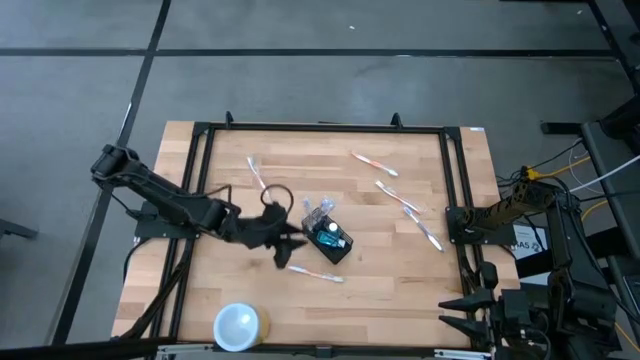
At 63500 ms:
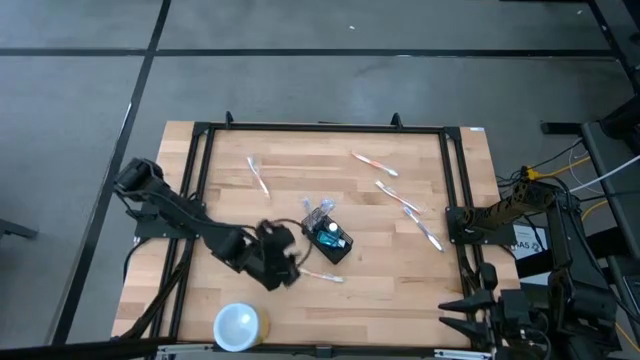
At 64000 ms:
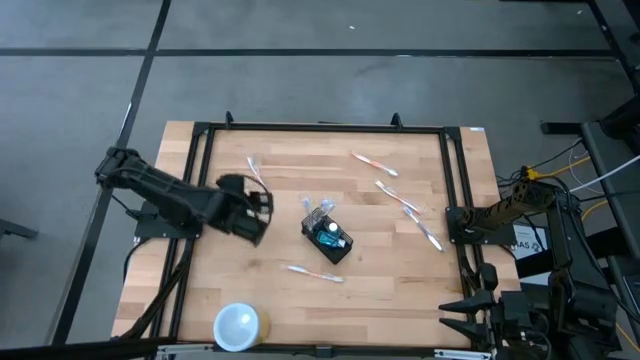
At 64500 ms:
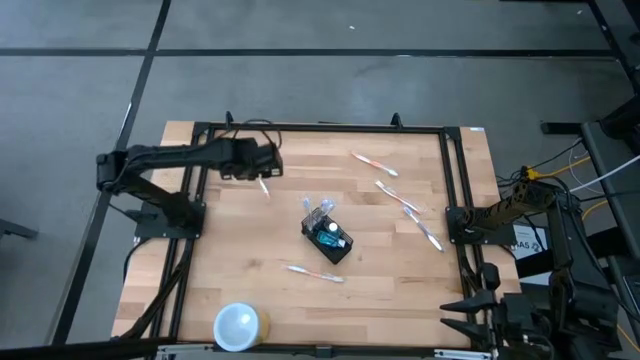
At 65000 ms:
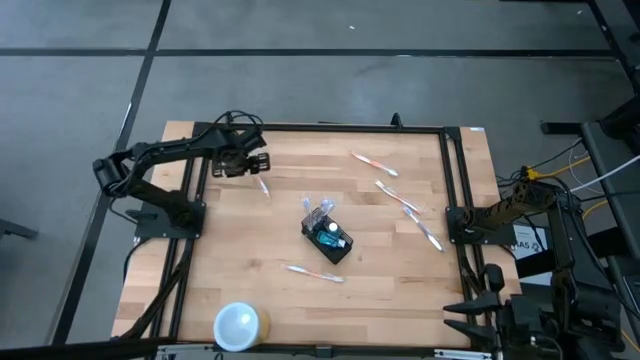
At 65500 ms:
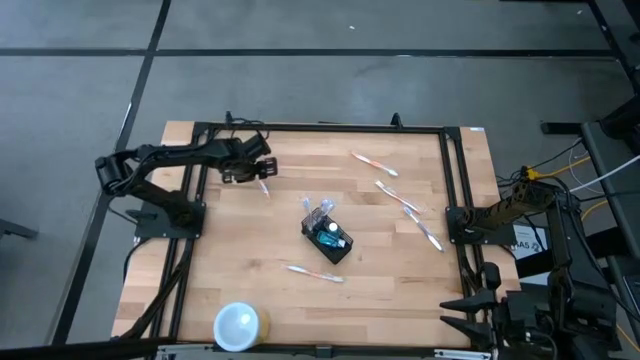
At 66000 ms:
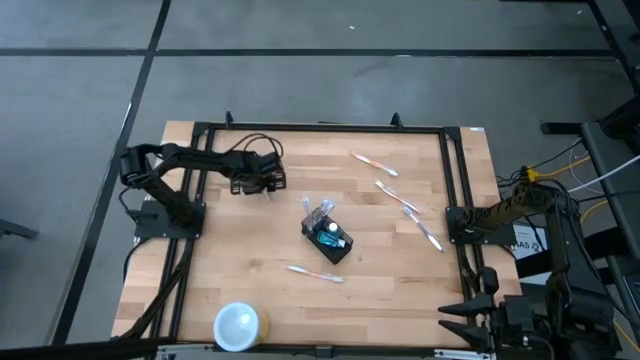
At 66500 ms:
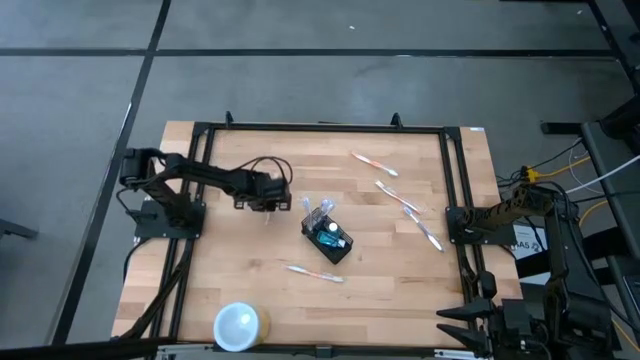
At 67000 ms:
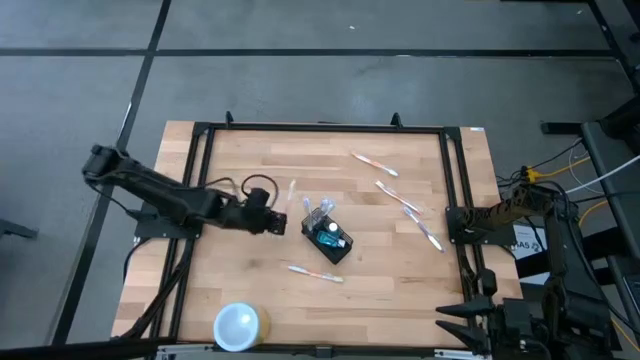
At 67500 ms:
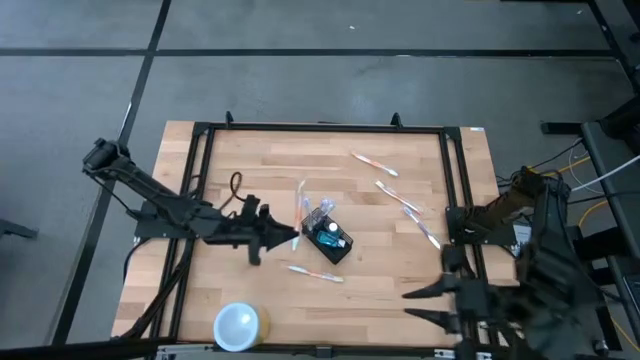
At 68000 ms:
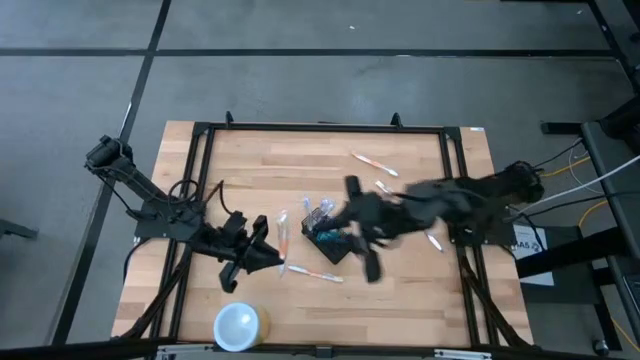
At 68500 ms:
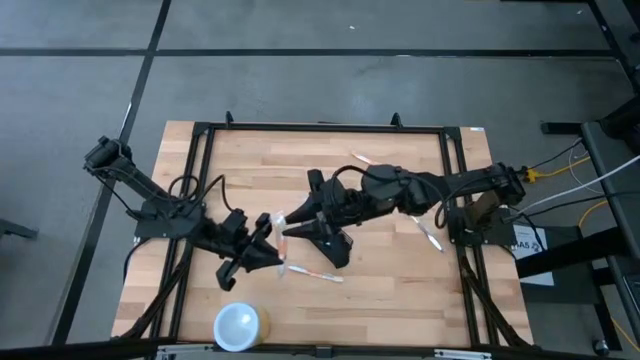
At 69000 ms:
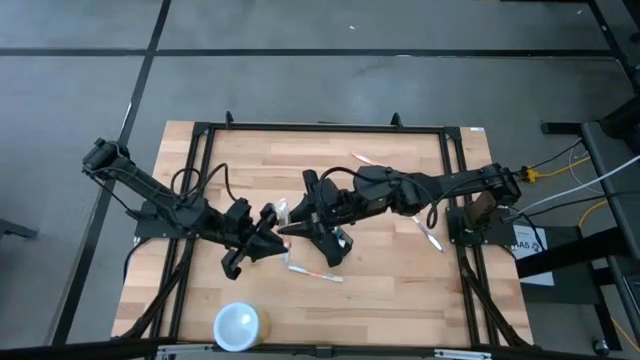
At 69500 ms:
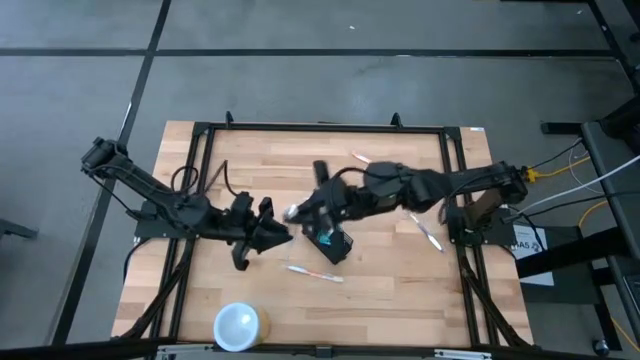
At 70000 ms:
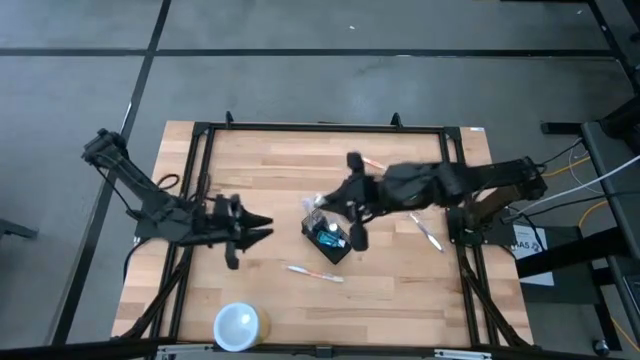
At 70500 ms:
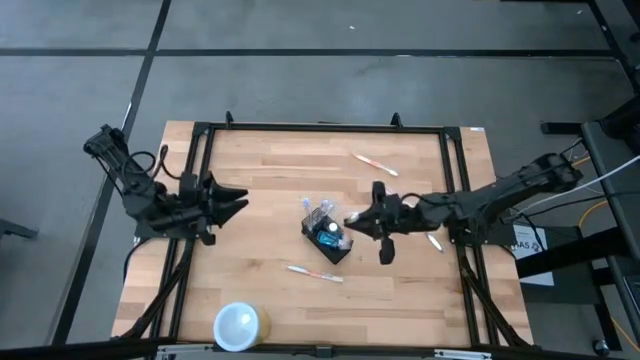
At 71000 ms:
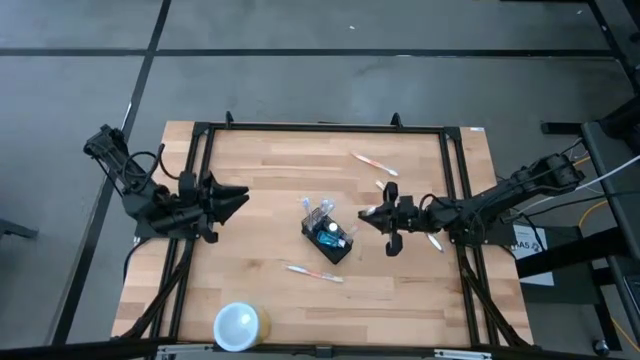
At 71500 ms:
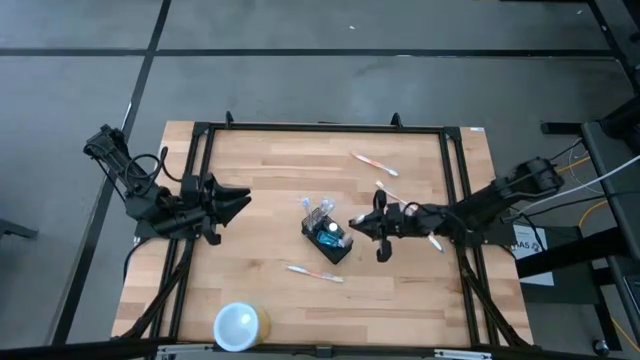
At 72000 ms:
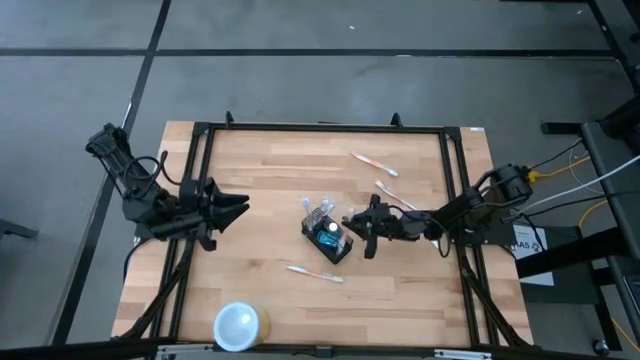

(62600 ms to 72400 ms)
Task: Pick & Place toothbrushing station
Put the orange toothbrush into the wire organizer

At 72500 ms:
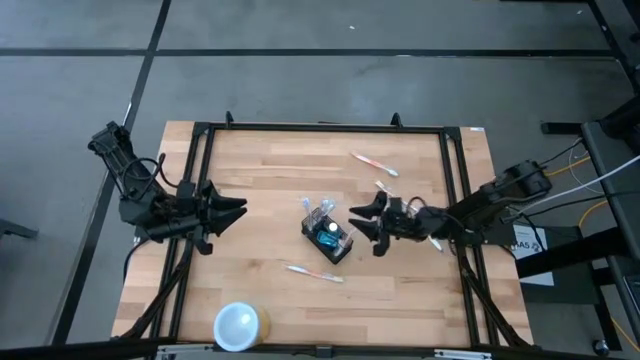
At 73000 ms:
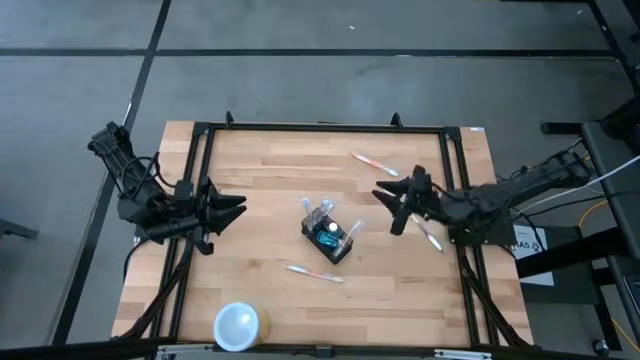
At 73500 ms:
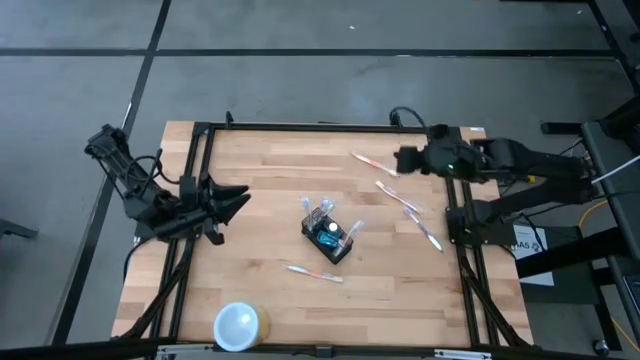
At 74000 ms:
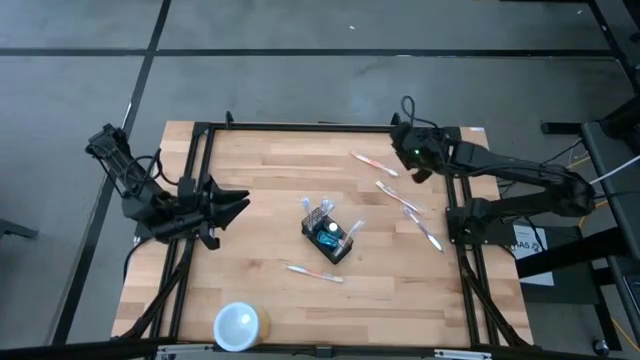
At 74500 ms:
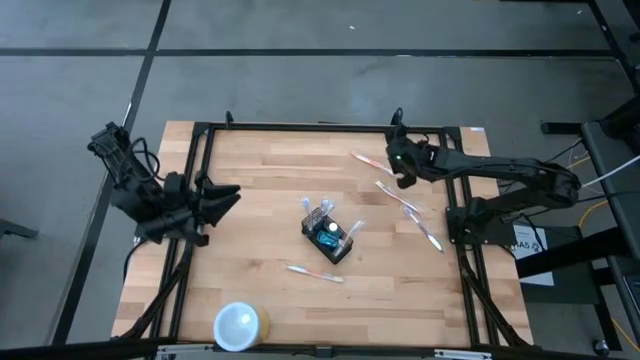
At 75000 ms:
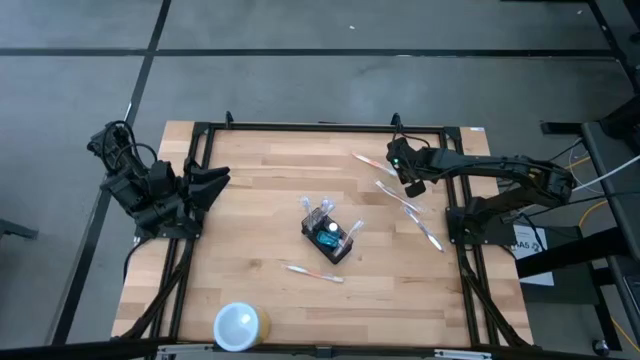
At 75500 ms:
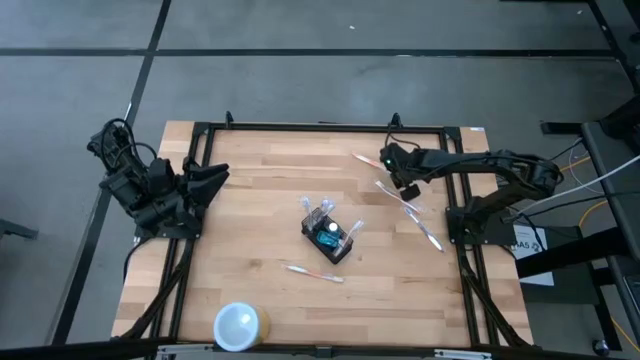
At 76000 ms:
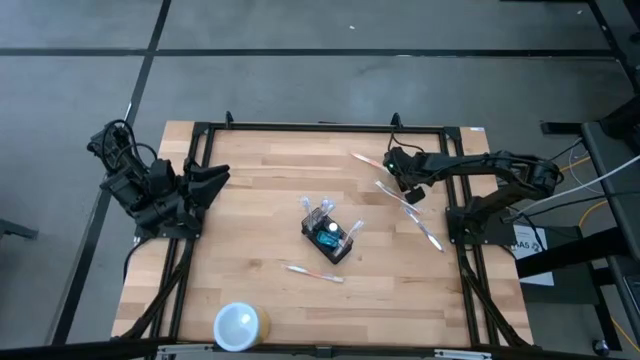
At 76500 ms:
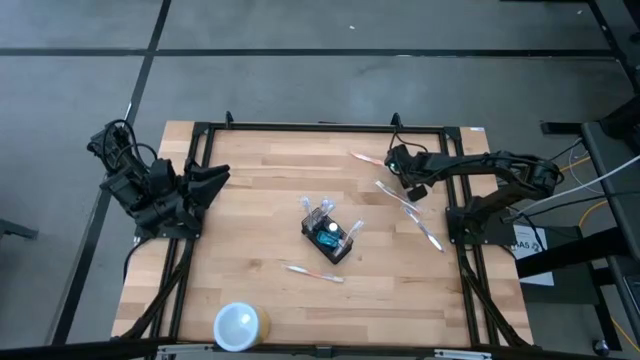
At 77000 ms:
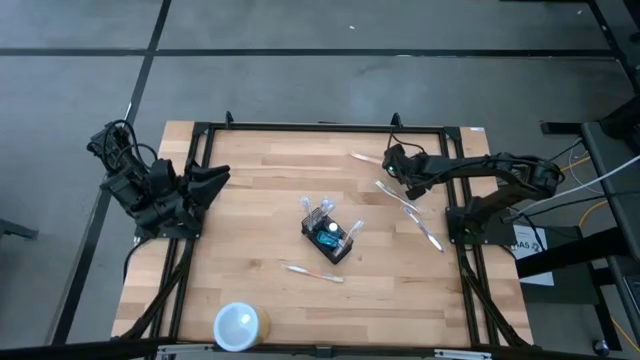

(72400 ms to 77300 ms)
Put the orange toothbrush into the wire organizer

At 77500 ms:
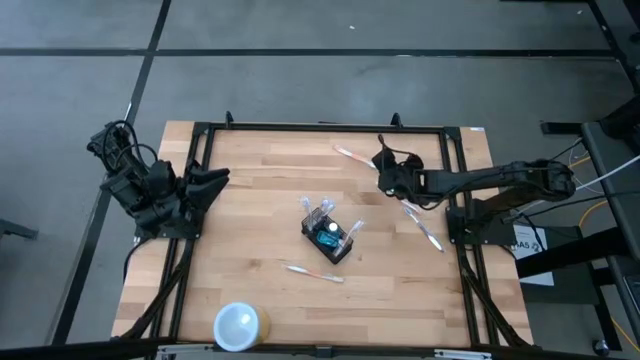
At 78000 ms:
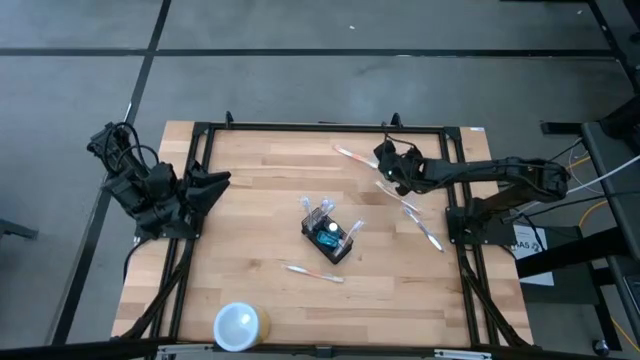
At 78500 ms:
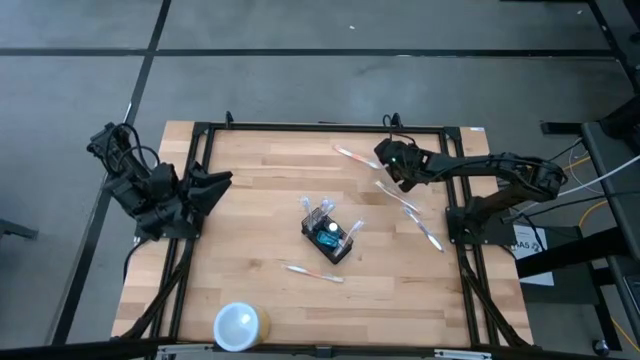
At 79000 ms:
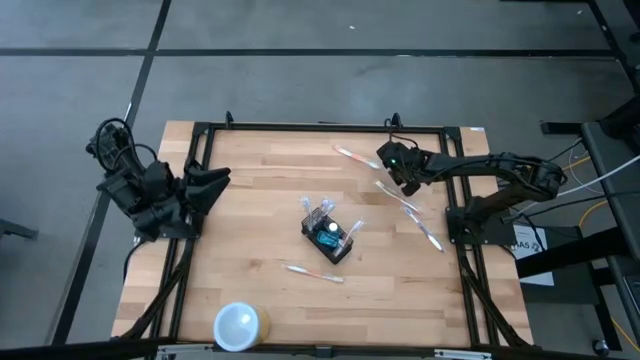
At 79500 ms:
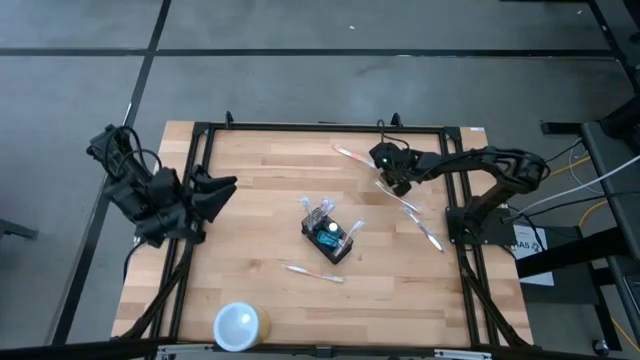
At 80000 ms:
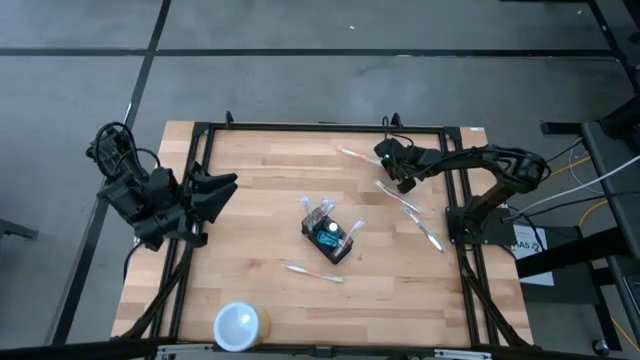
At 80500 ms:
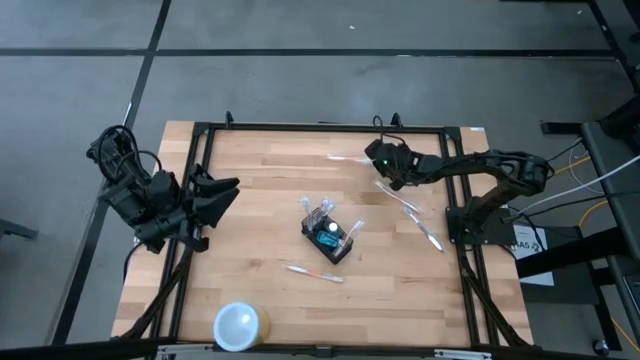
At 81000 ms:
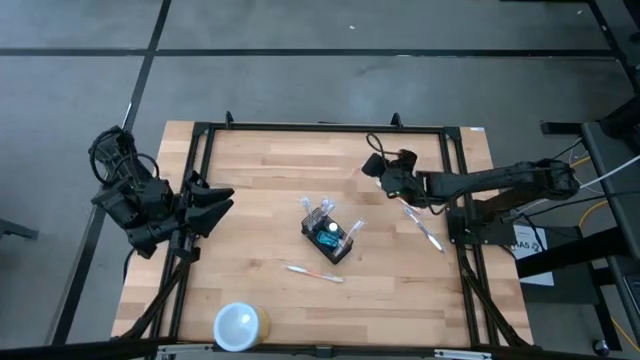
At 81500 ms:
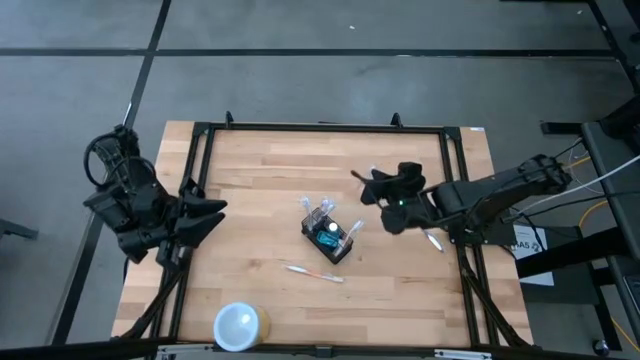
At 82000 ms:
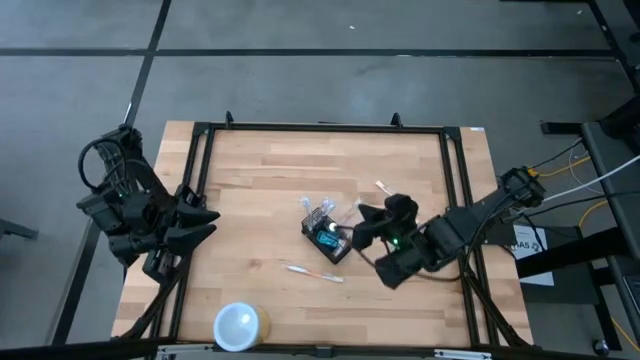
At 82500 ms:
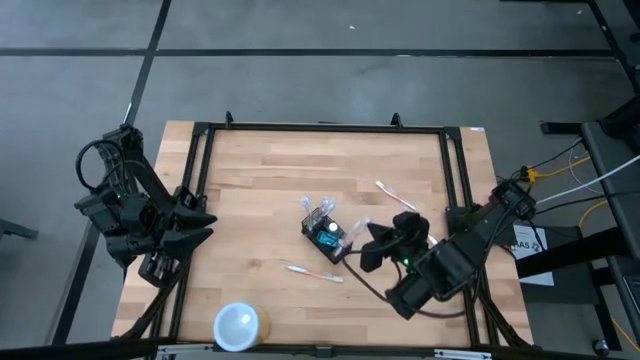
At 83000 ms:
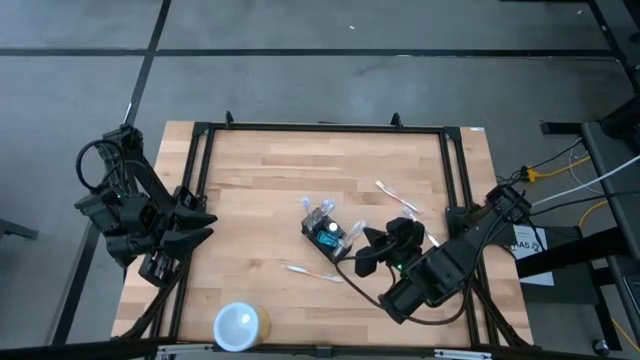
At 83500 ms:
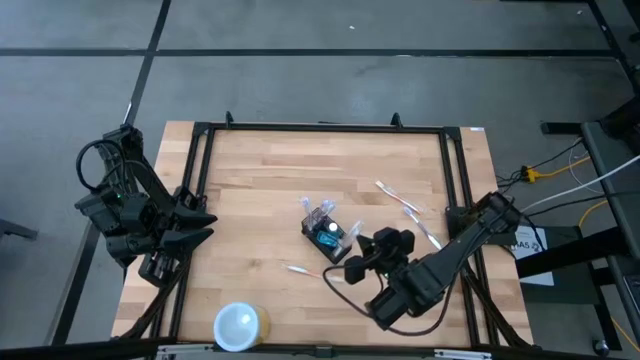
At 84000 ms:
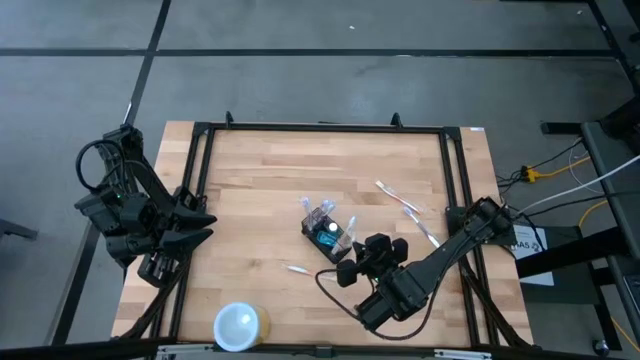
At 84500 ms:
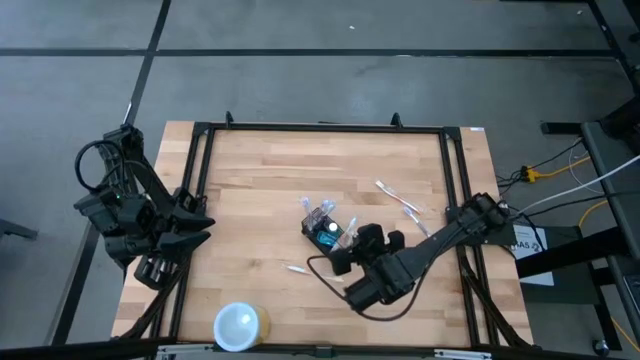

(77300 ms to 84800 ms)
Put the orange toothbrush into the wire organizer
